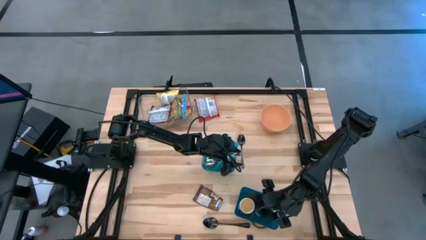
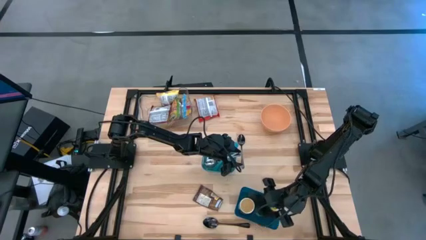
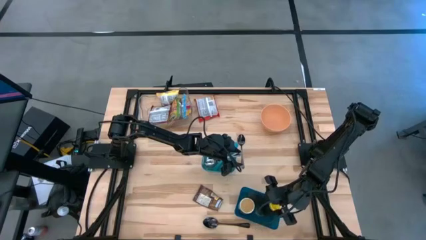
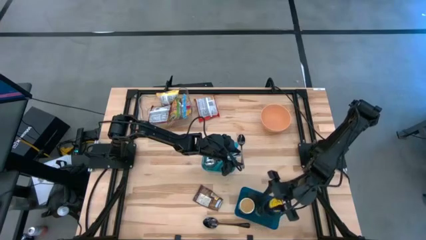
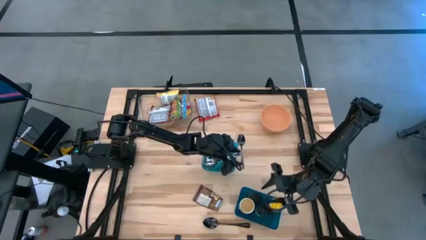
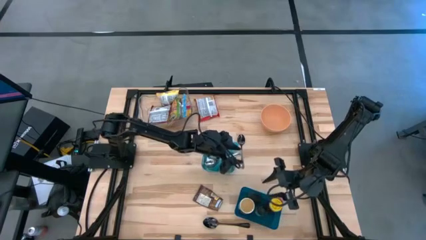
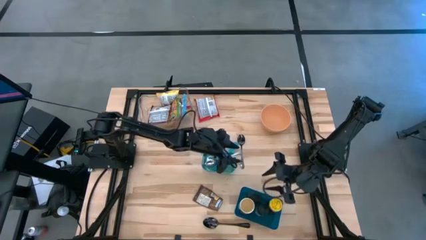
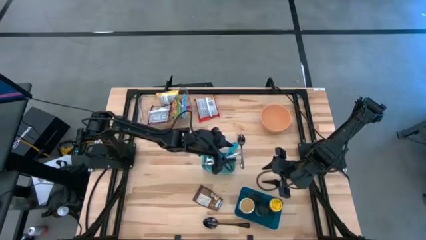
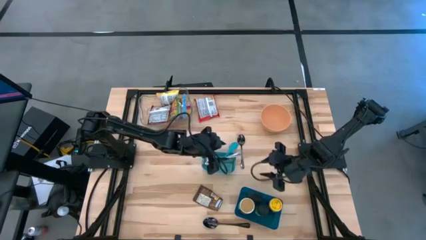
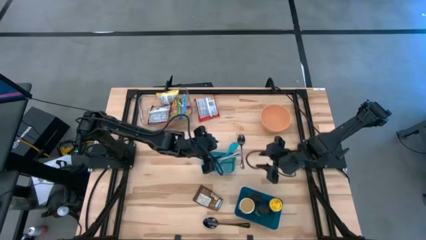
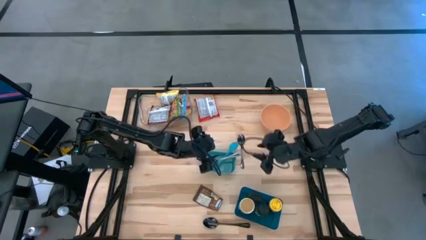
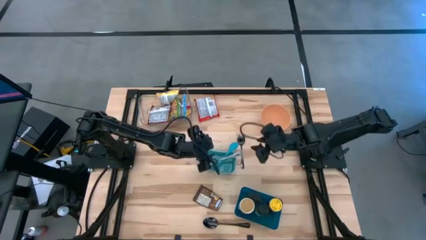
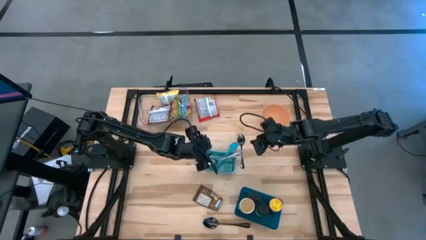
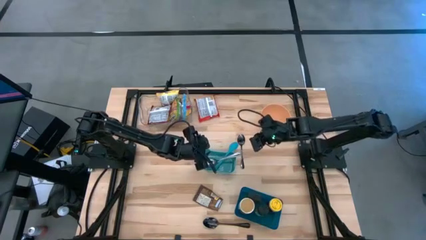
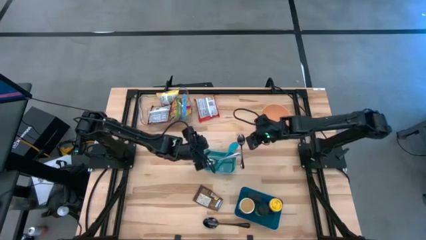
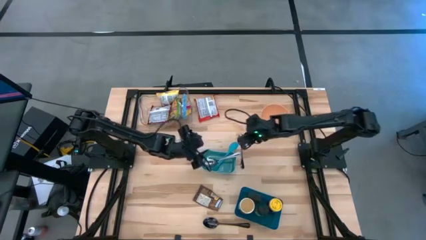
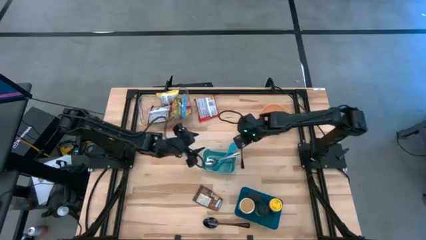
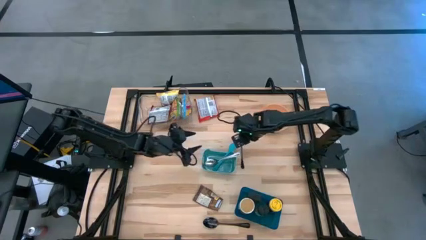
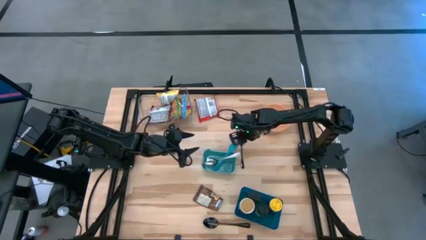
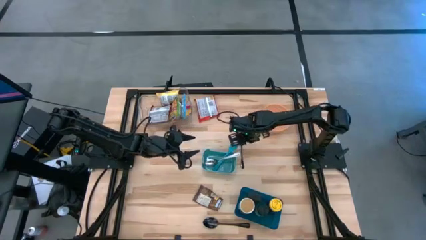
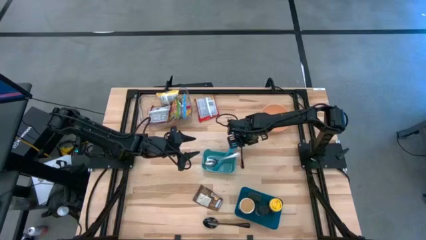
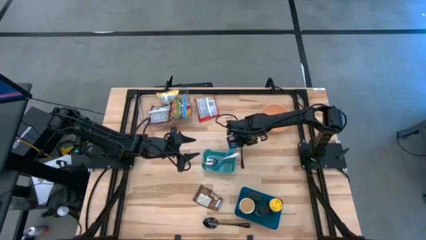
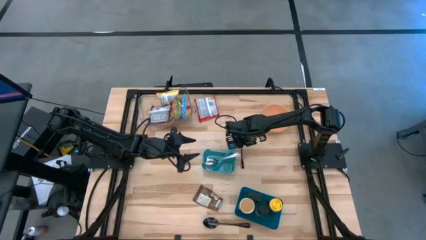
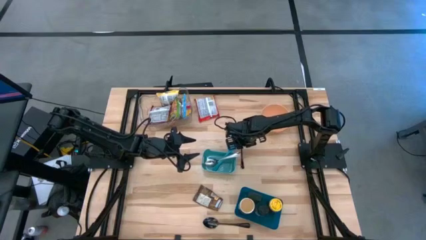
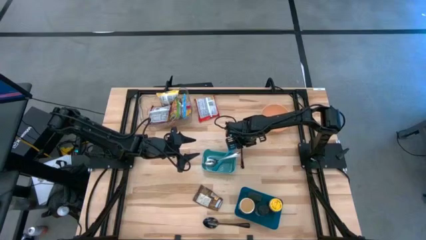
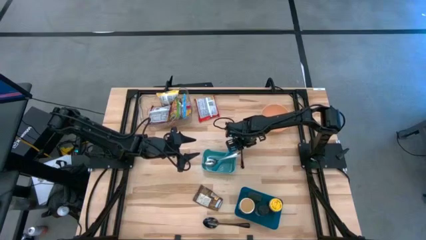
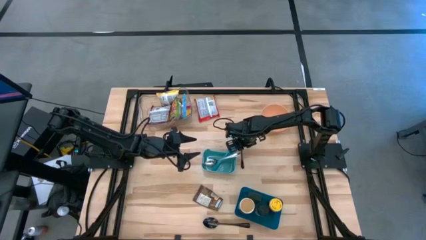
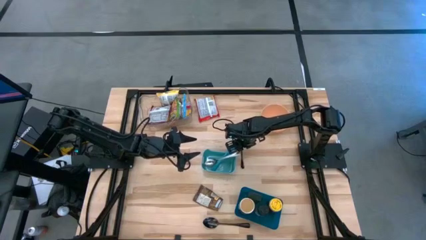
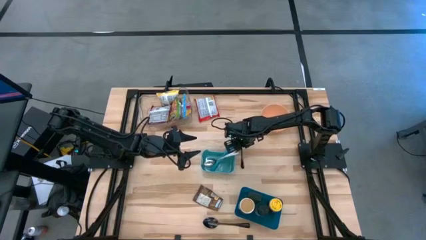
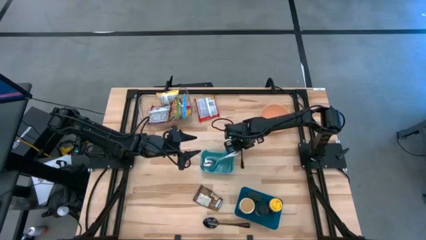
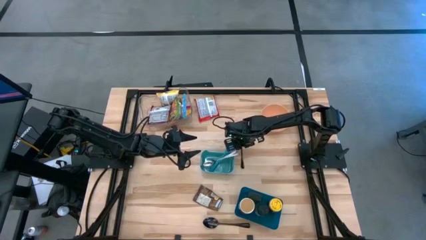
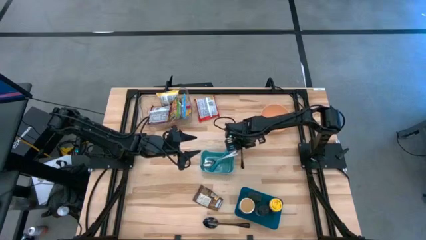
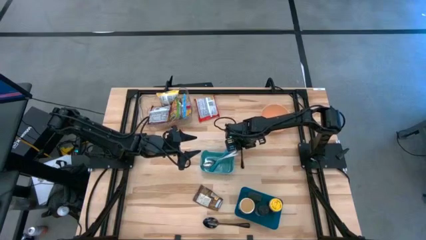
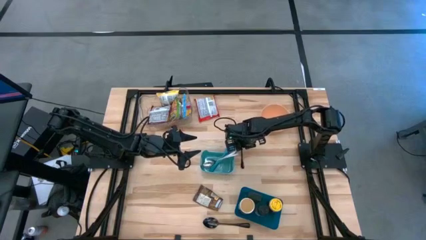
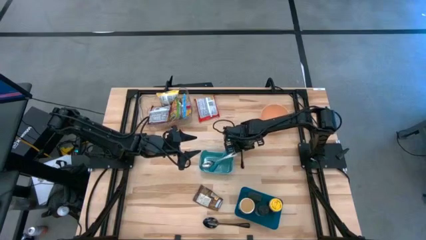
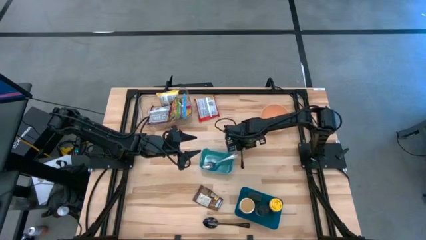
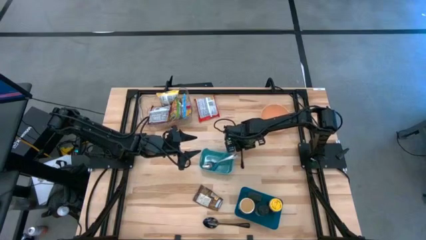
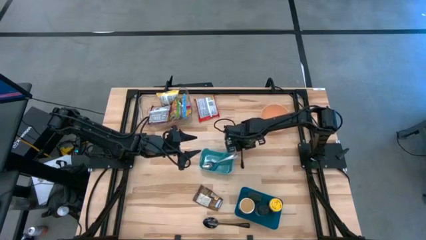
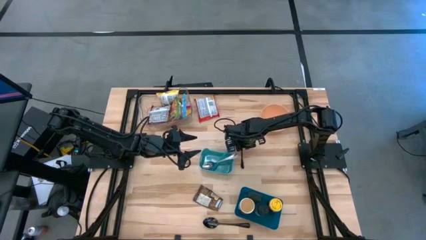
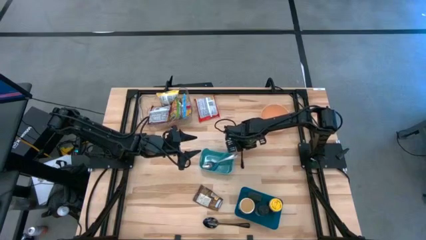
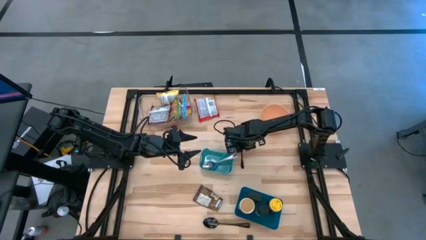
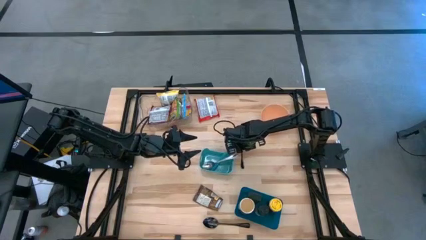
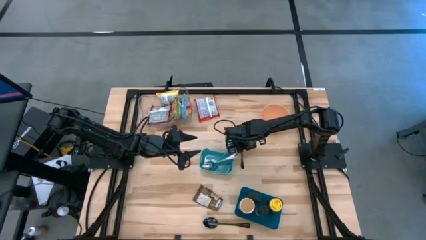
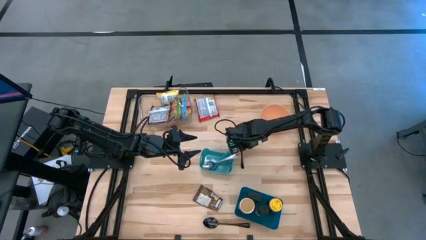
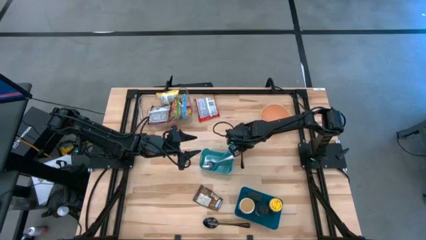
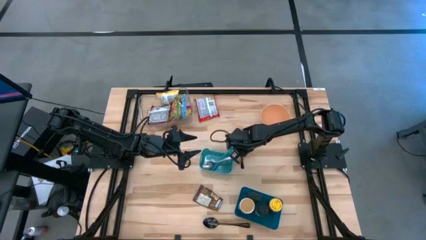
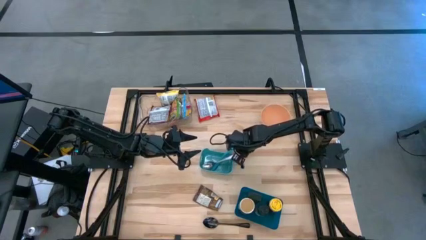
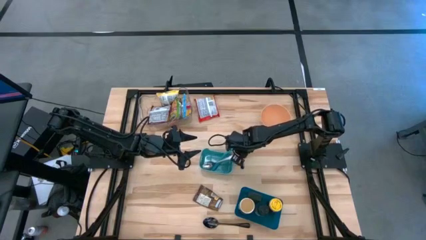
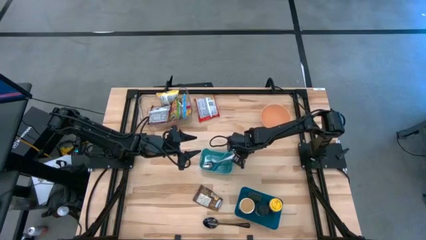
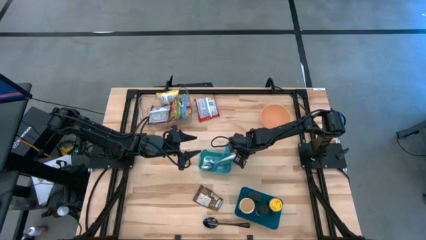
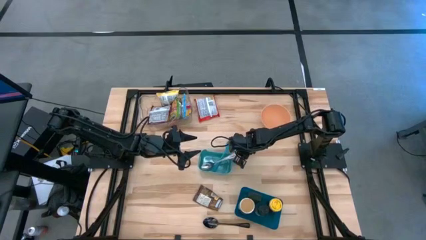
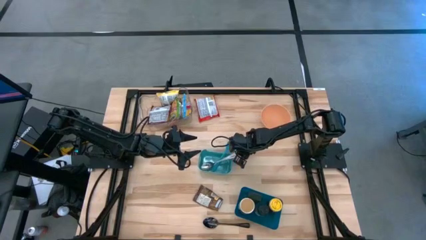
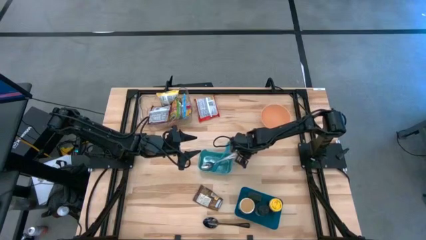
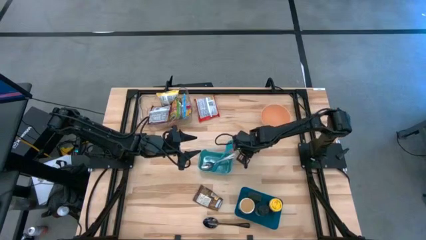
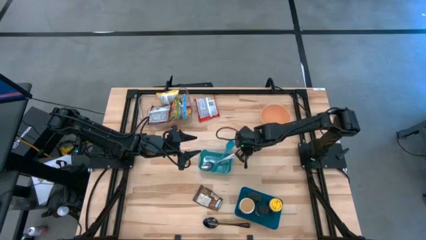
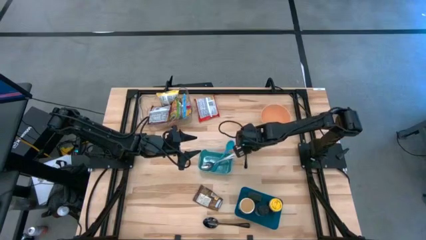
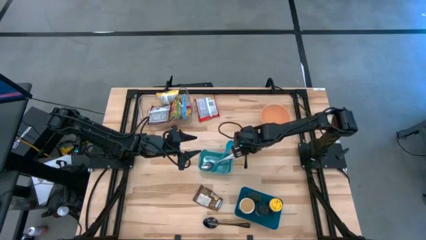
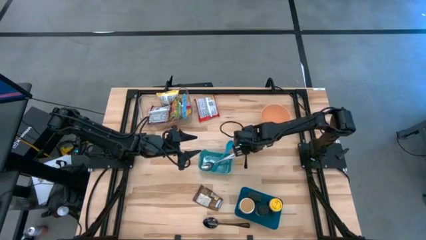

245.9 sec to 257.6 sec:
Task: Pick & Place Food Item
Put the top black tablespoon into the green bin
